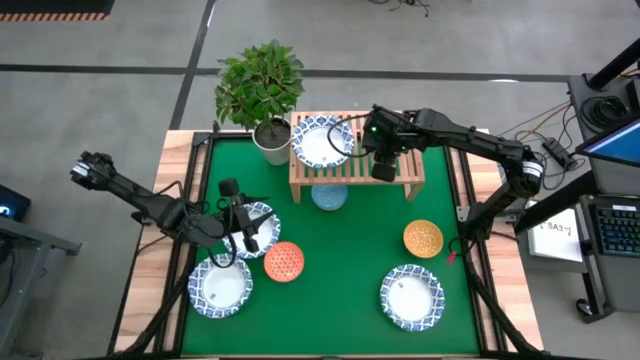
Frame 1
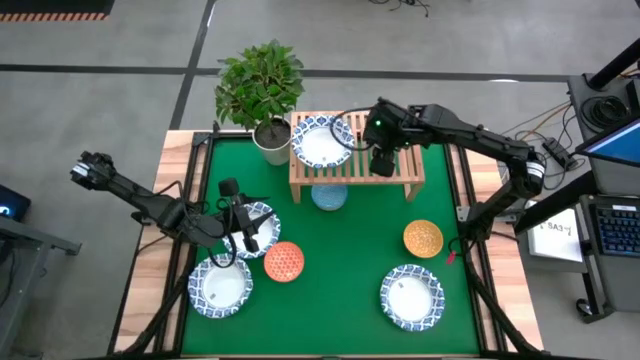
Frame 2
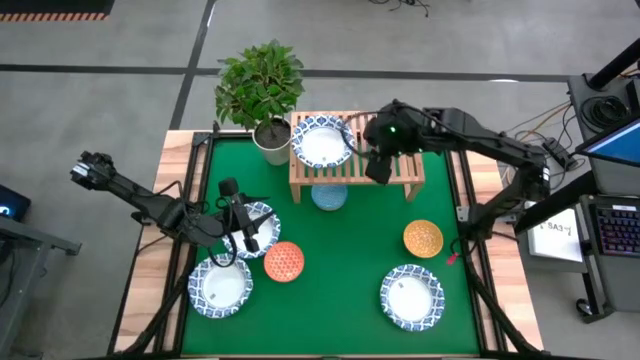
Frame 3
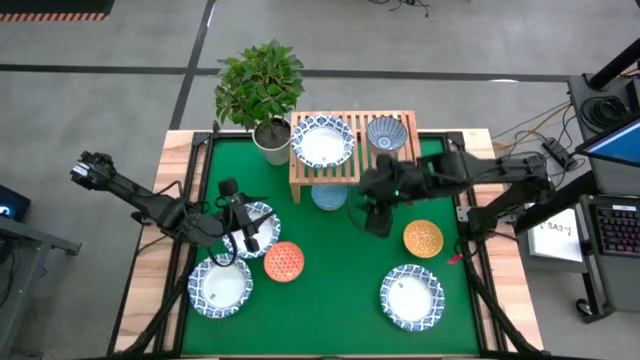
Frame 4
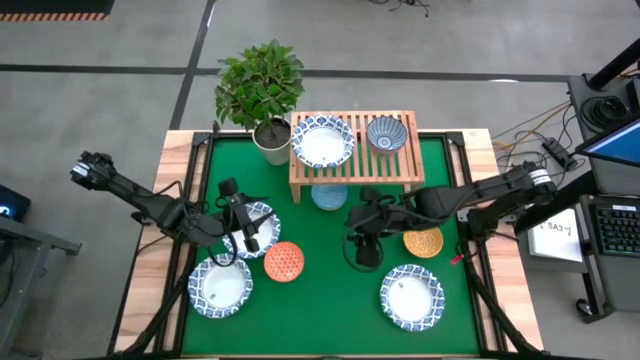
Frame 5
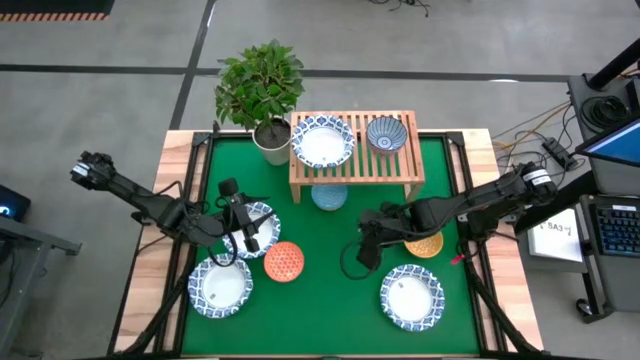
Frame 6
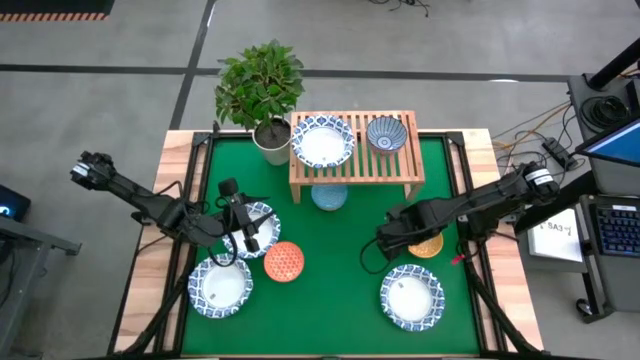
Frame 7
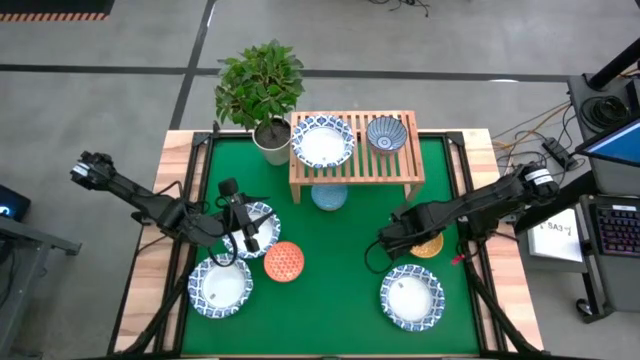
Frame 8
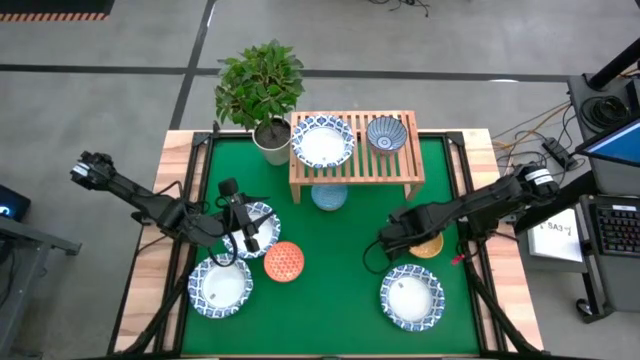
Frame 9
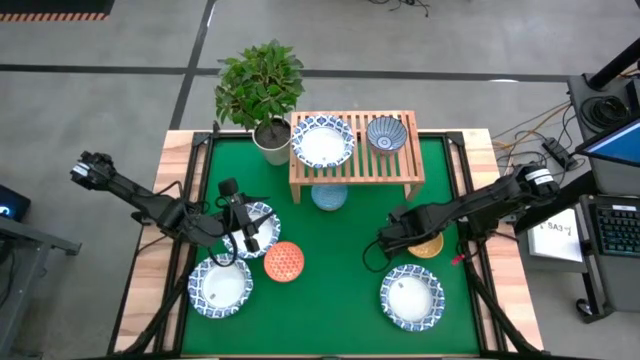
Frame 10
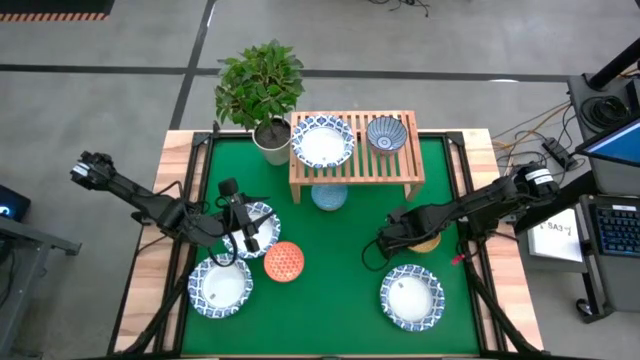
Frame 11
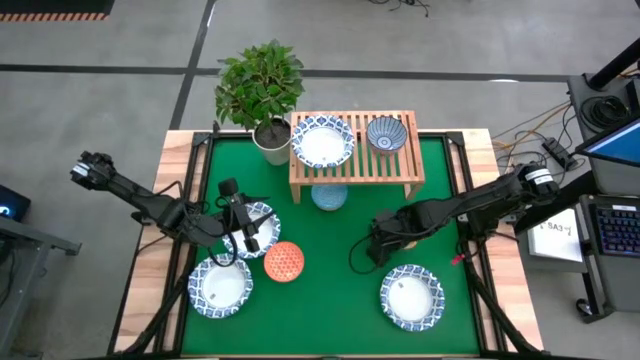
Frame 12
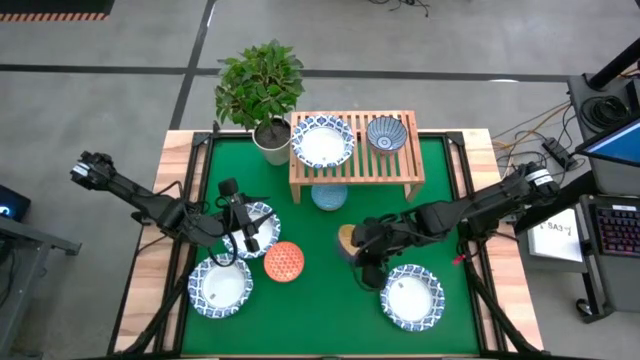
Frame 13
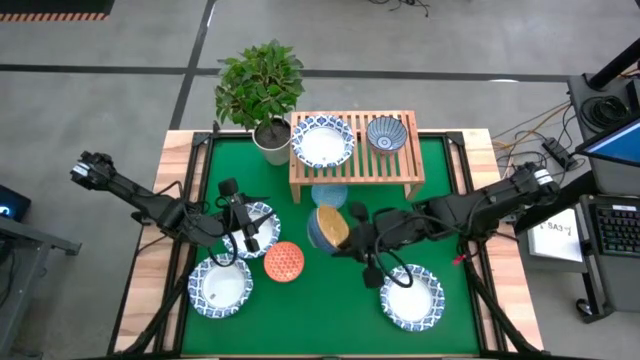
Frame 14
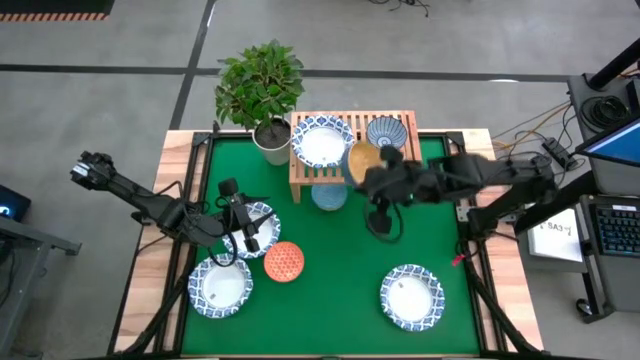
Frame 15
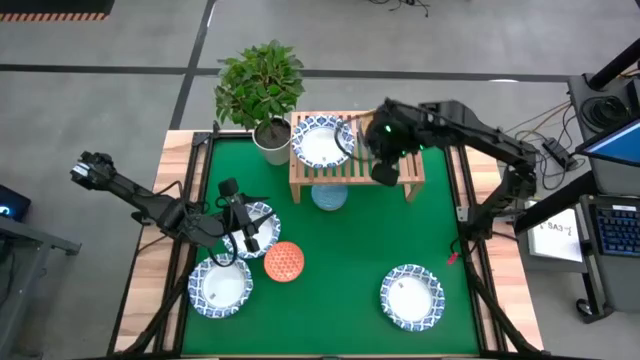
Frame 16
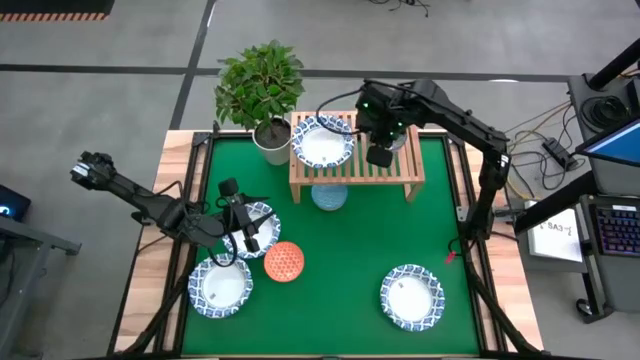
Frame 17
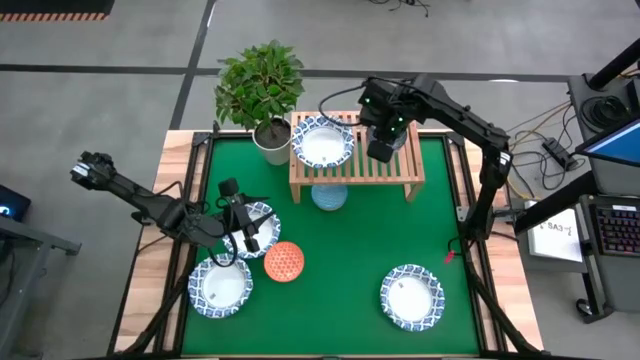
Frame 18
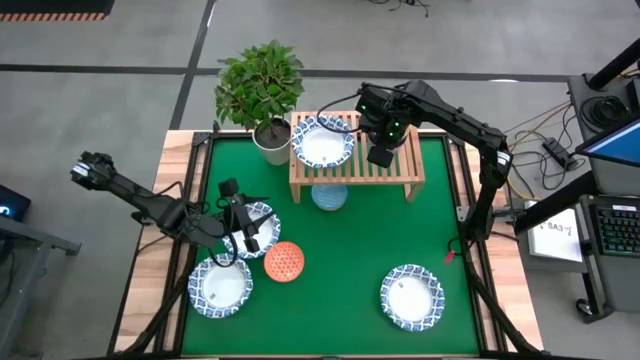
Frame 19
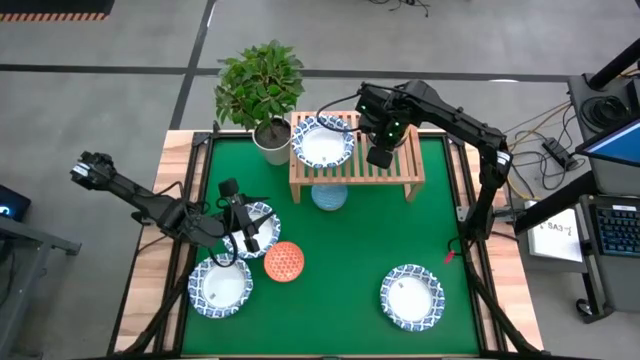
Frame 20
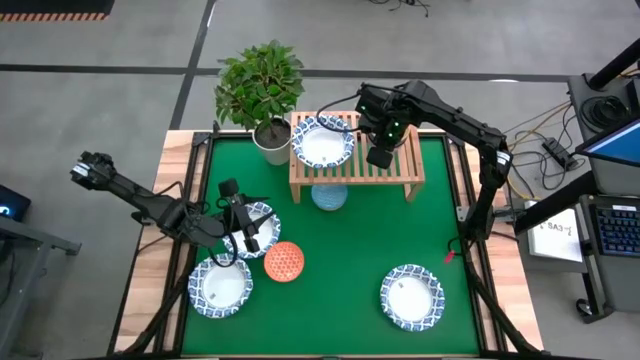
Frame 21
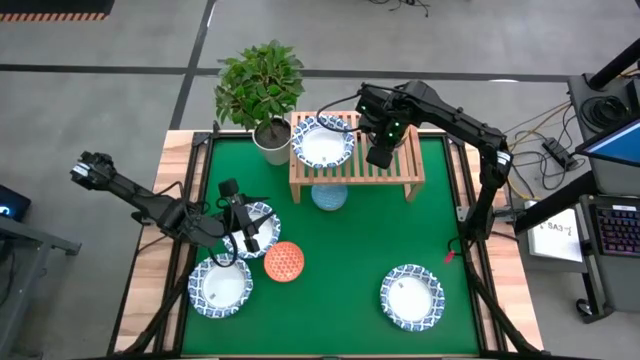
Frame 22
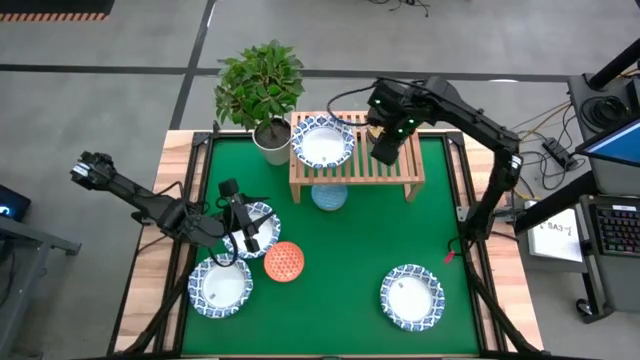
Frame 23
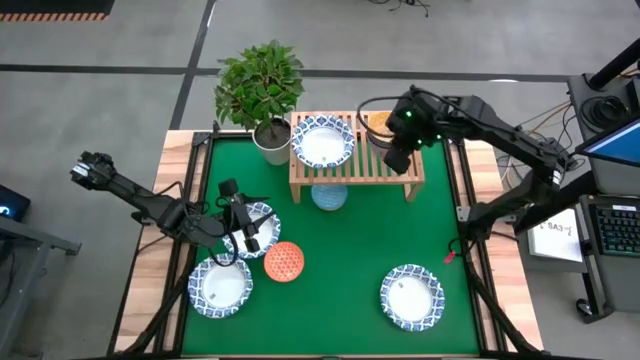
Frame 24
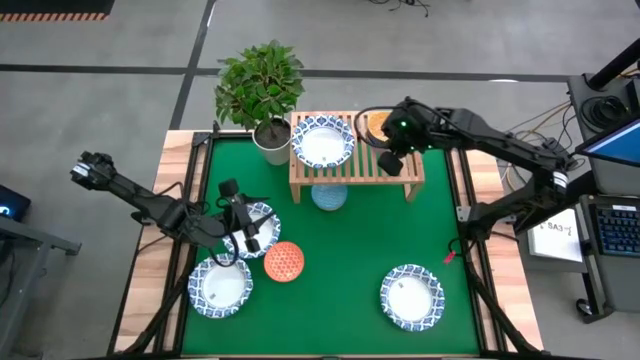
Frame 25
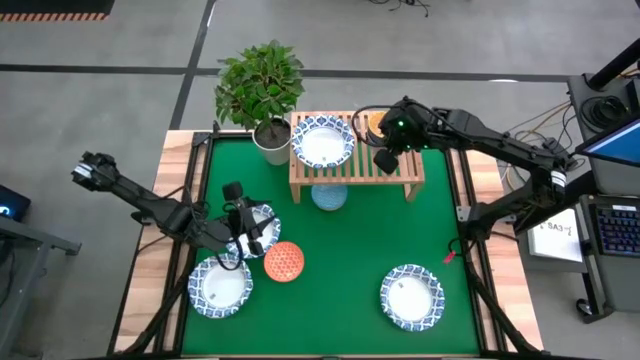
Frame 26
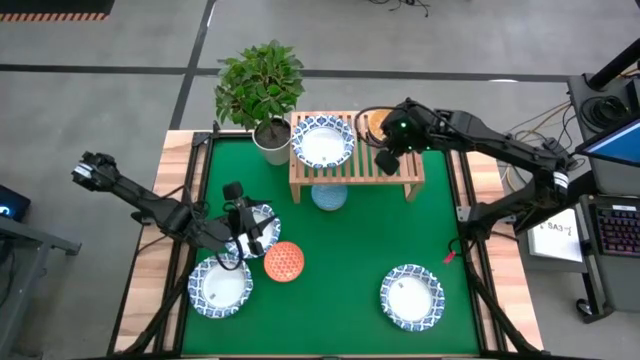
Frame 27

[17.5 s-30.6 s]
Task: Place and stack bowls onto a shelf
Stack the blue patterned bowl on top of the red patterned bowl on the shelf

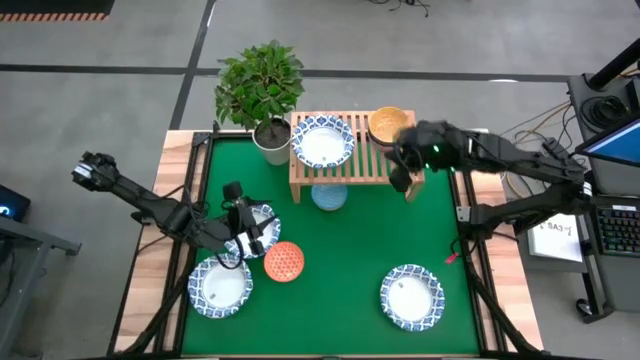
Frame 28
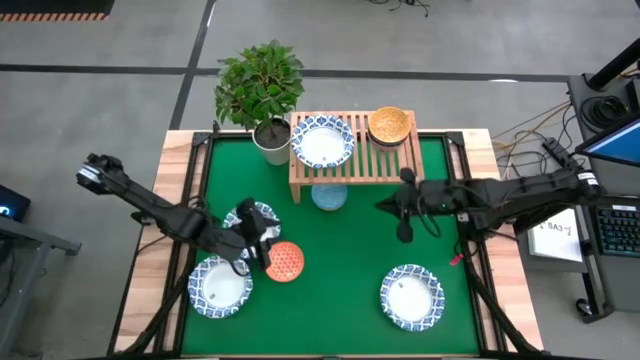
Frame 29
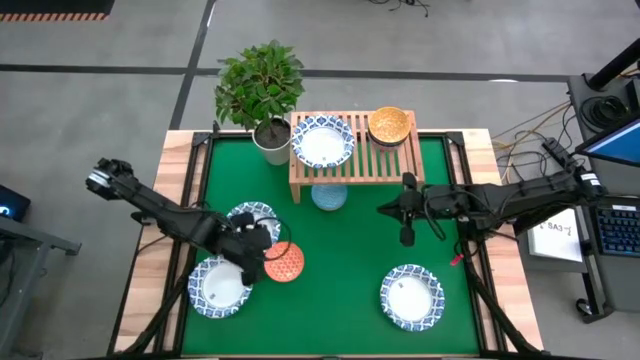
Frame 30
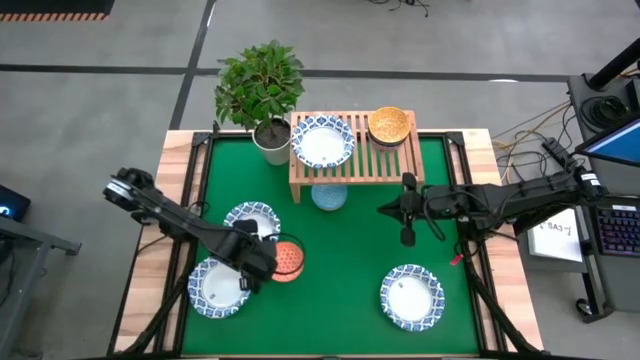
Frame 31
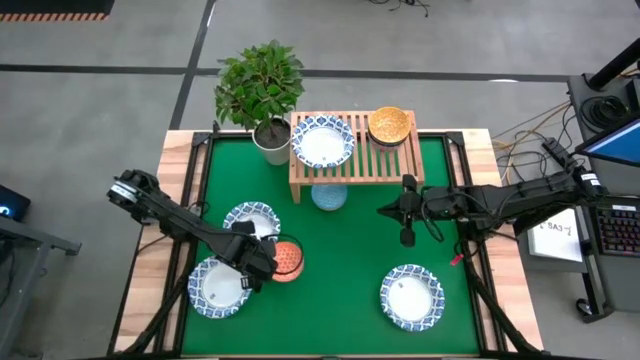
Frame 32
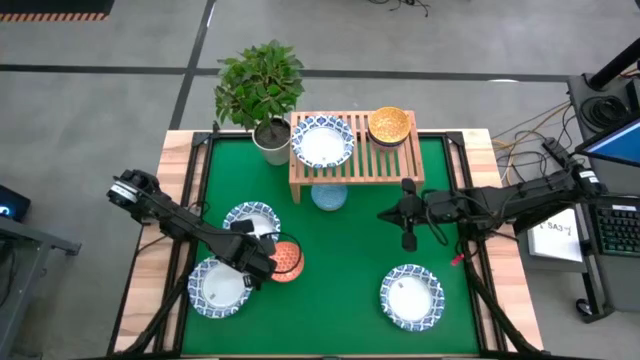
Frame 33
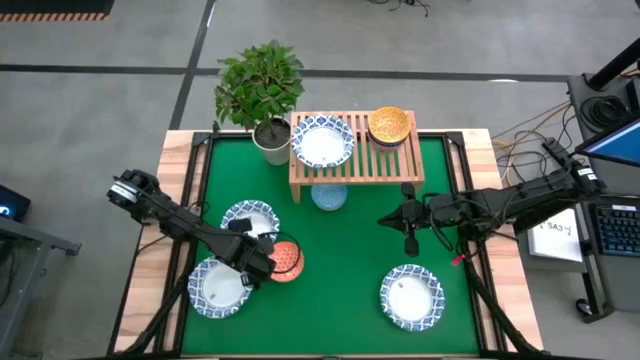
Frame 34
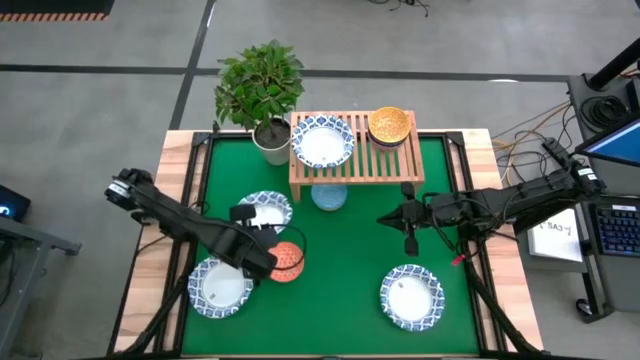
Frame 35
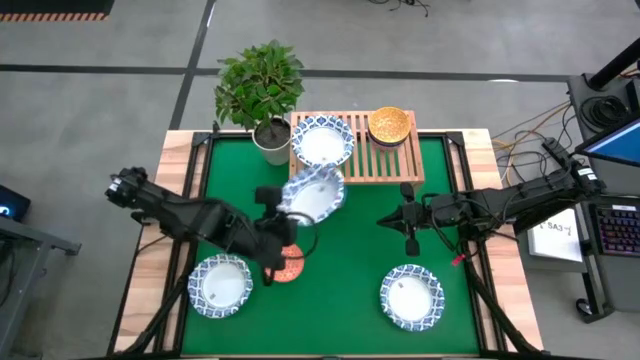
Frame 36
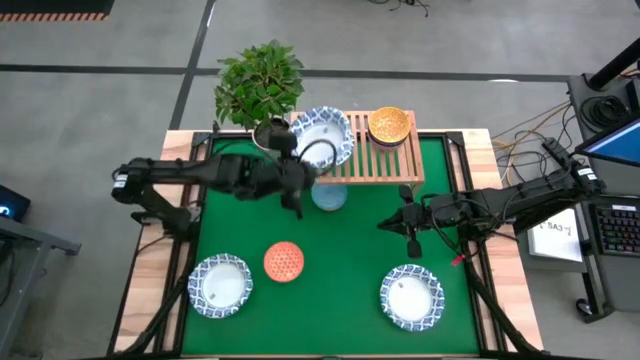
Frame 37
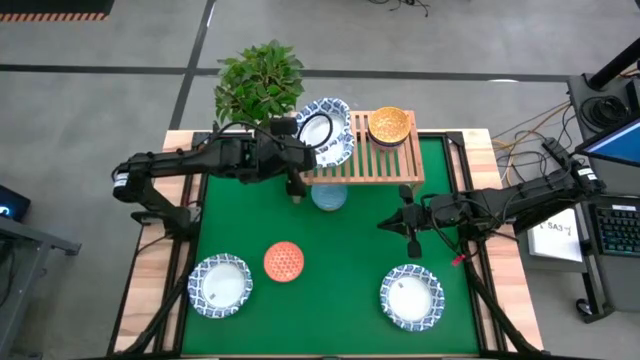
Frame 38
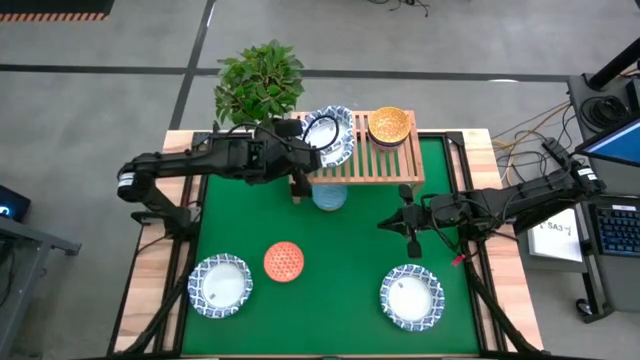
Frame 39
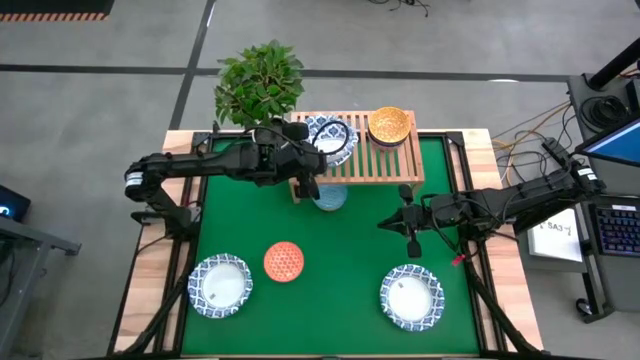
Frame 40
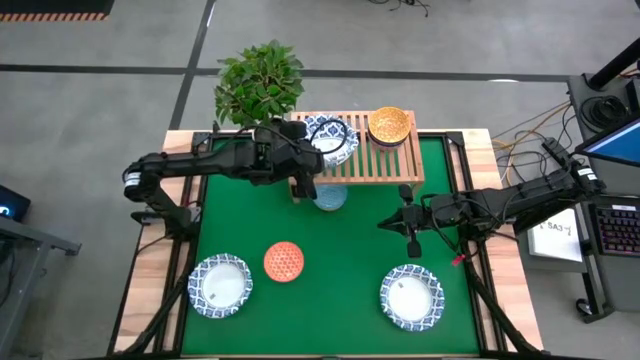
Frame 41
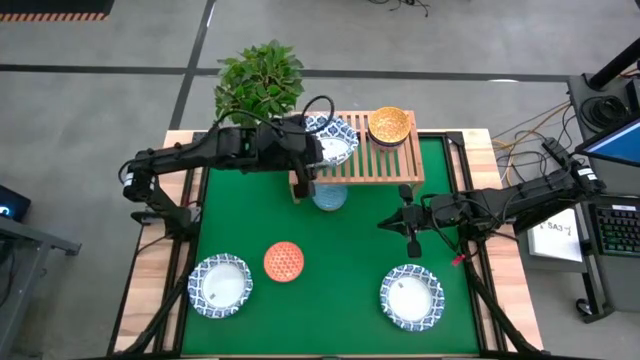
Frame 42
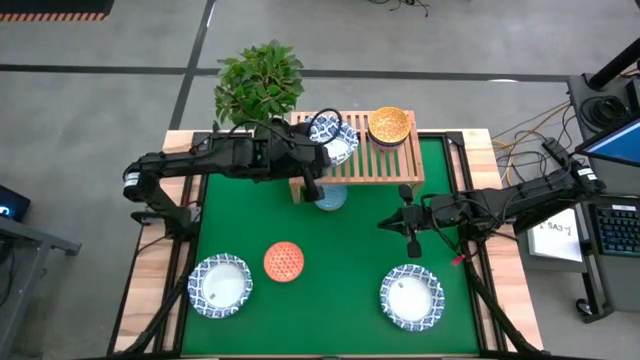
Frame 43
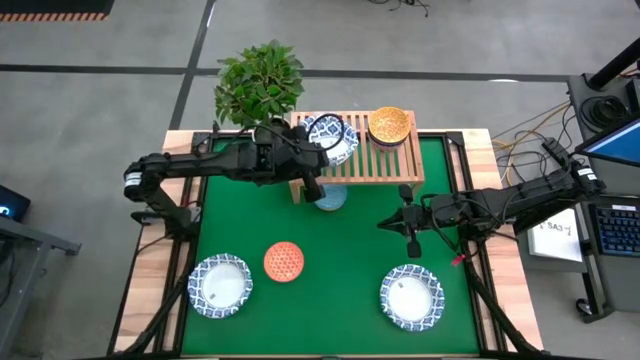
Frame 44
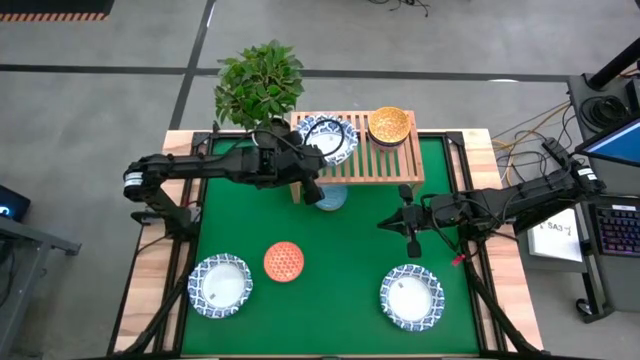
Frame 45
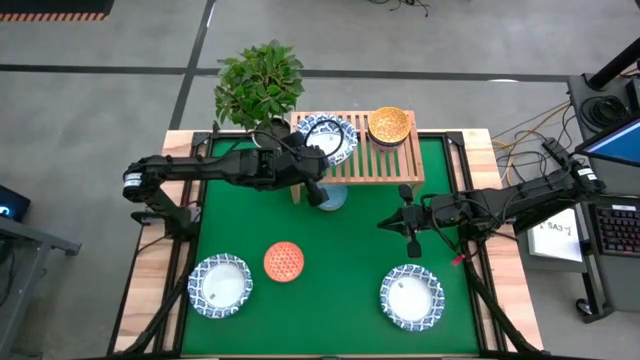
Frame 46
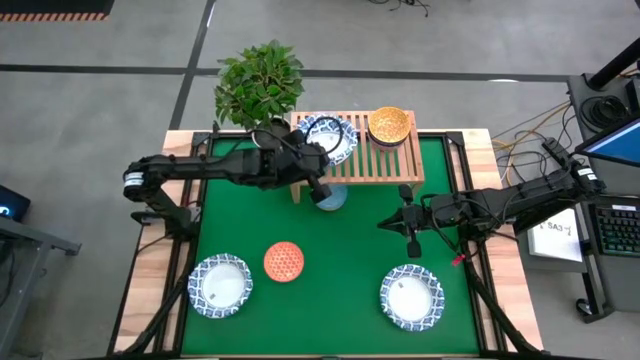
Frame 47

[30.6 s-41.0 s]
Stack the white patterned bowl on top of the white patterned bowl on the shelf
